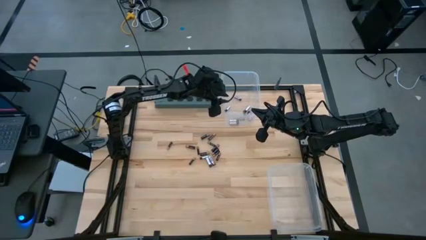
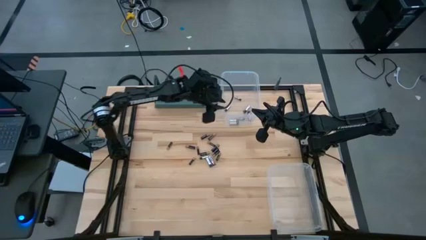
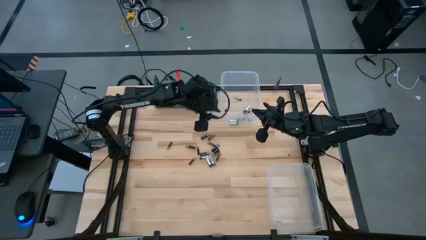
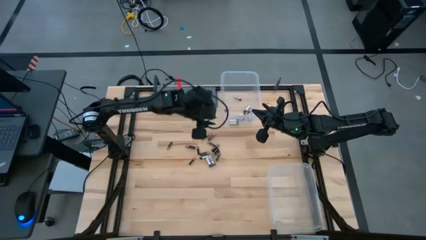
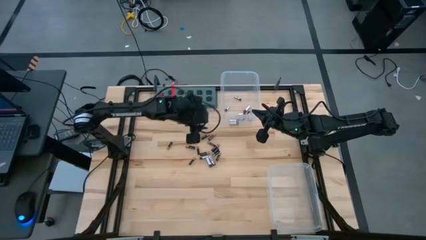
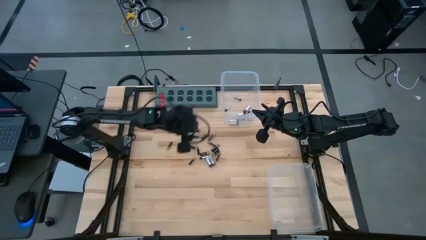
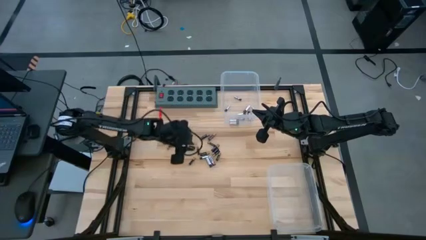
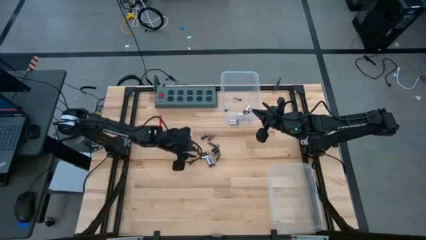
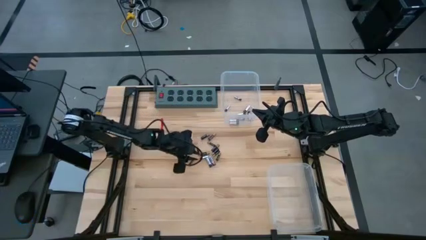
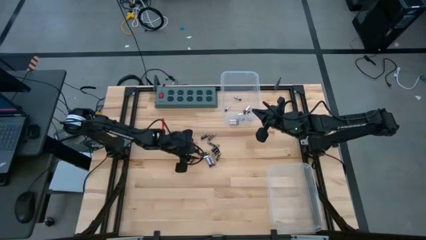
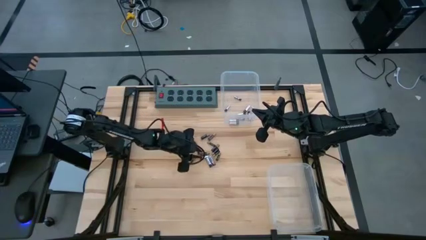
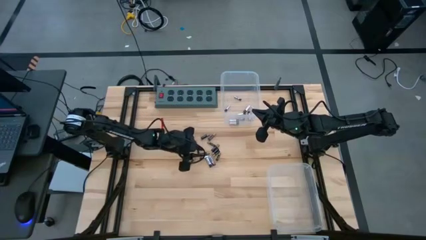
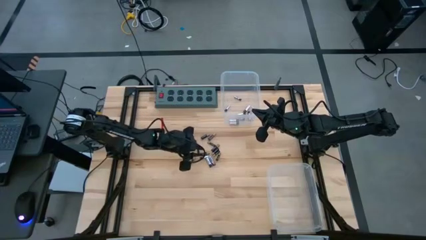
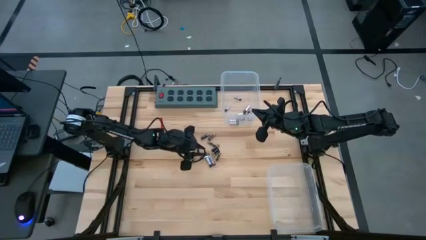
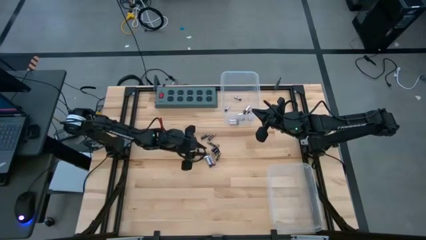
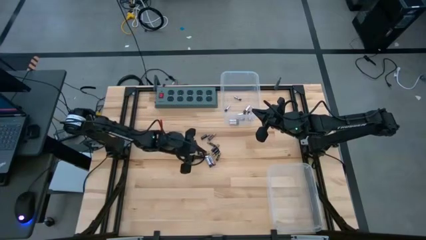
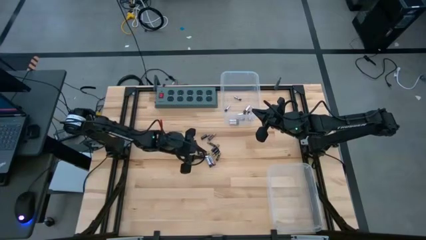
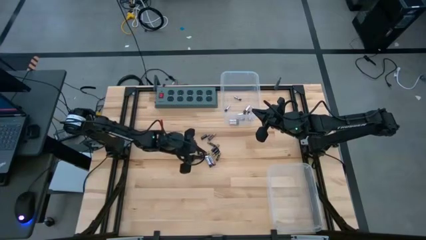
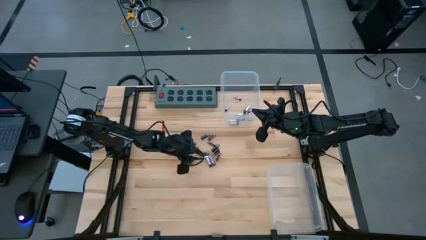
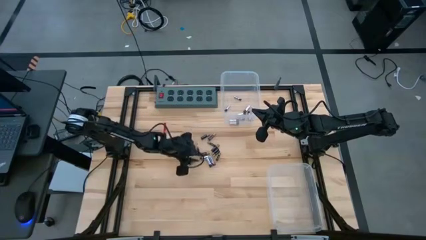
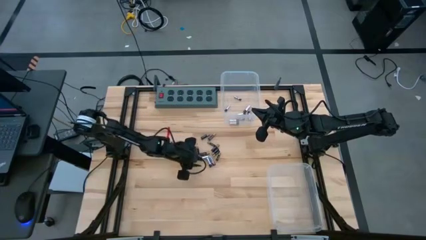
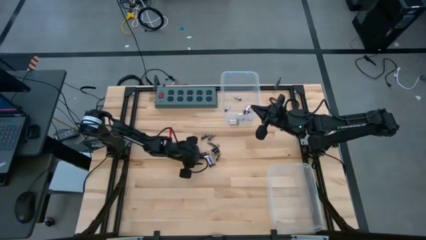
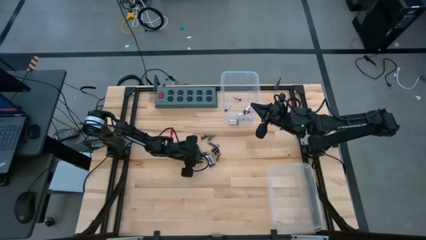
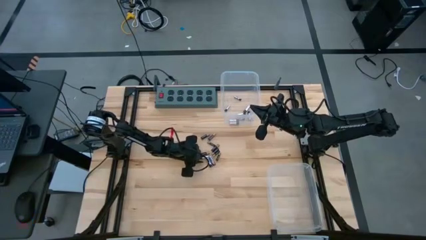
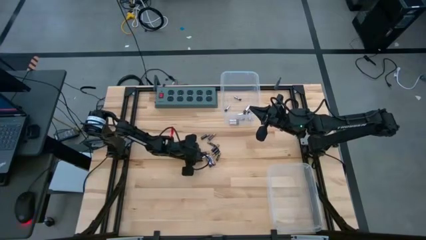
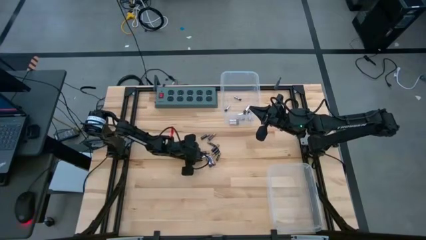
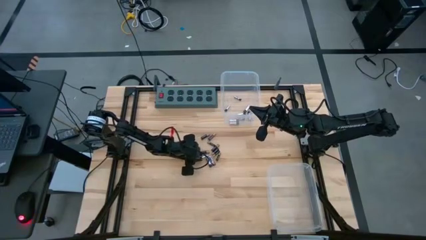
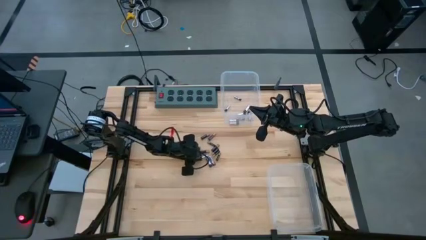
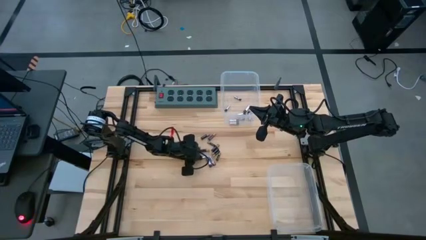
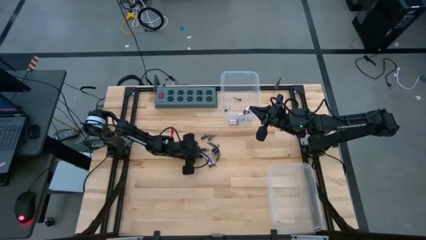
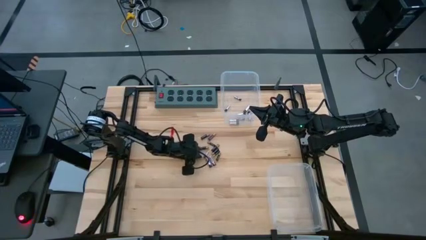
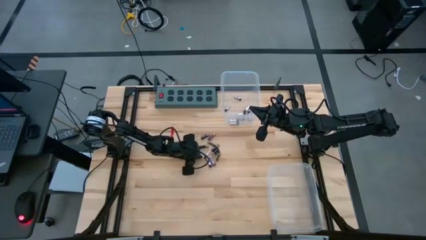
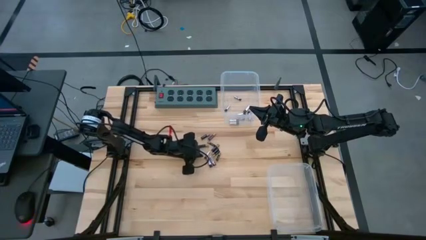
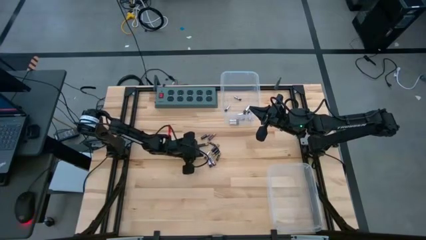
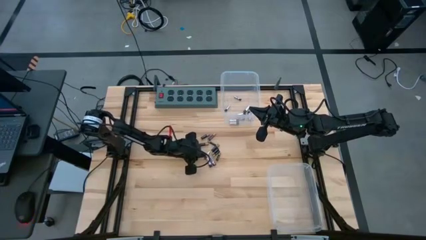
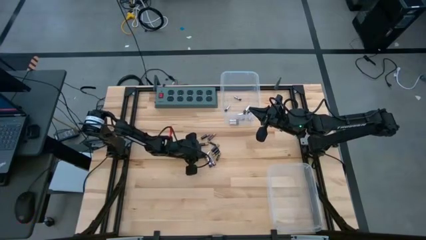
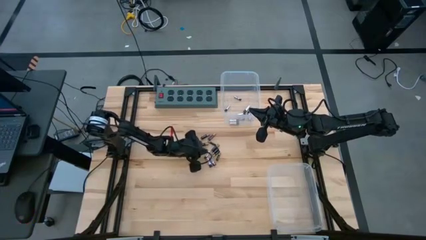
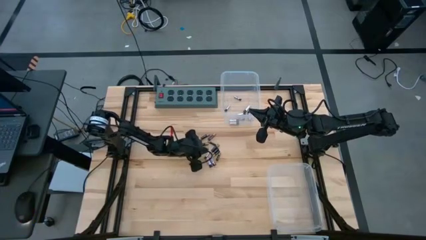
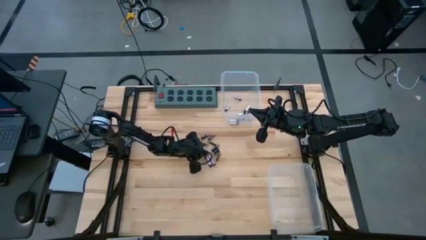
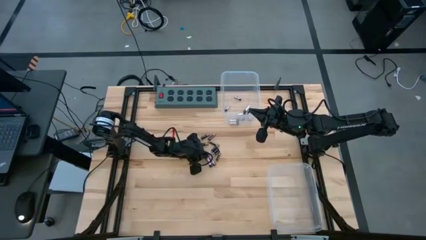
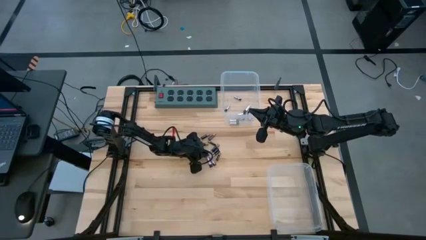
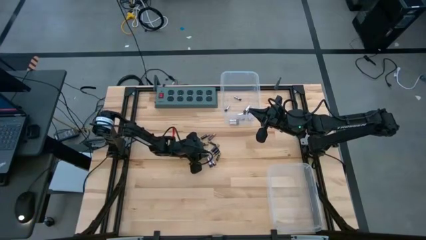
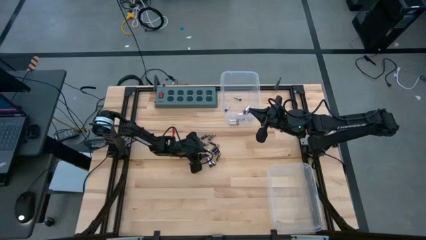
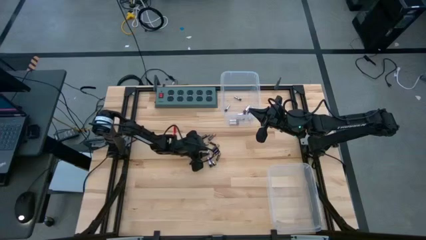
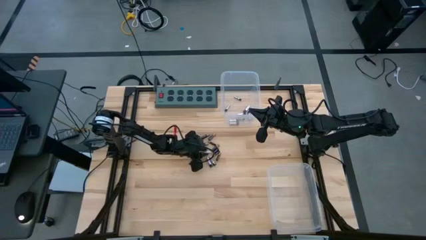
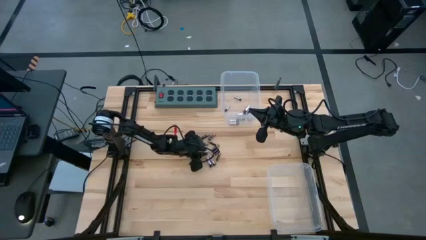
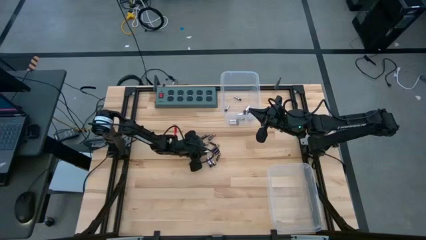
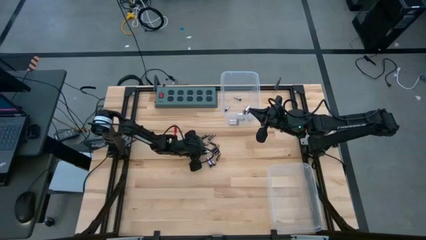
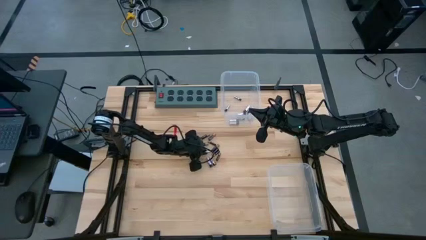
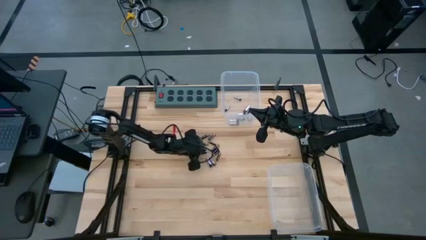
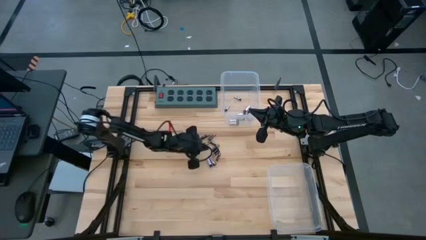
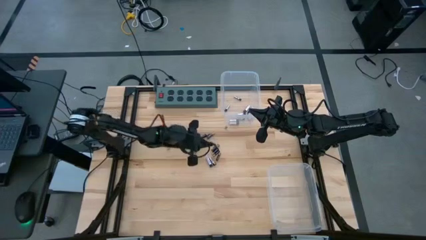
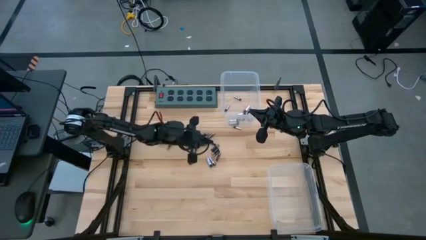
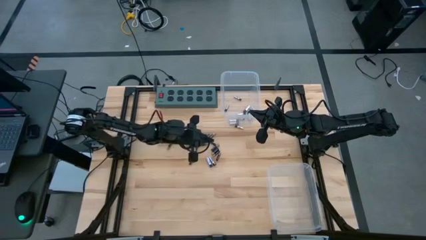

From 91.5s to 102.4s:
Task: Sort batteries
Put the silver battery into the top transparent bin

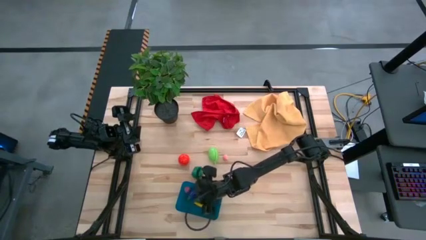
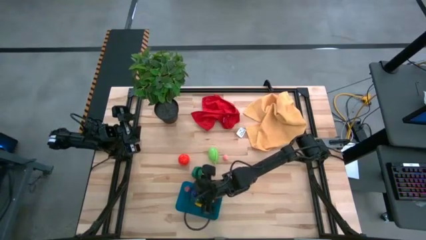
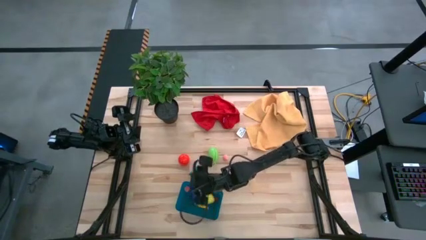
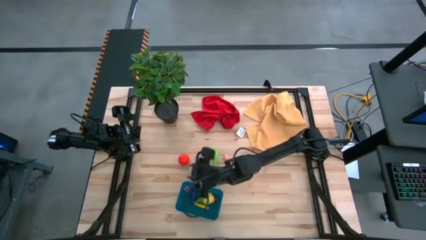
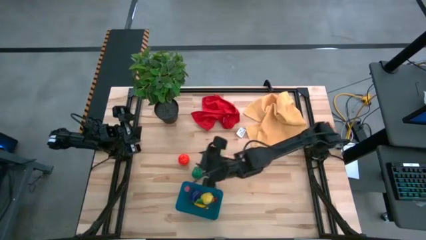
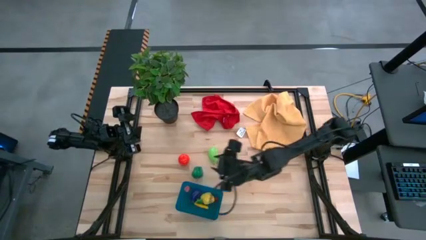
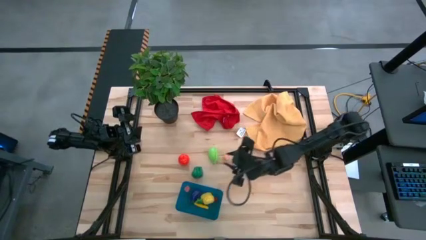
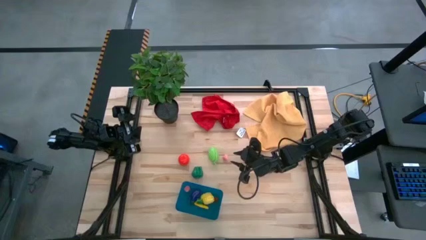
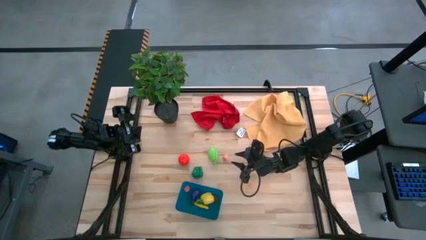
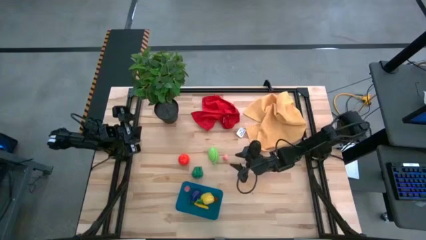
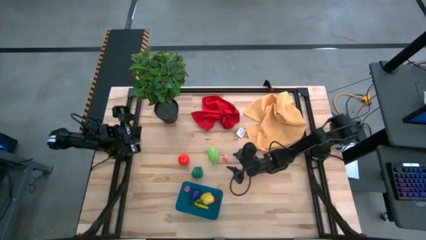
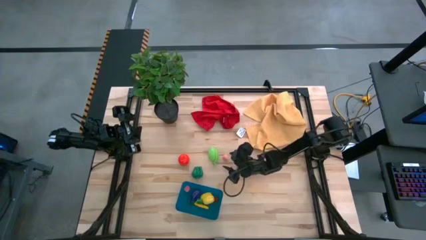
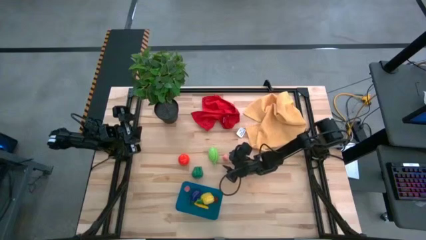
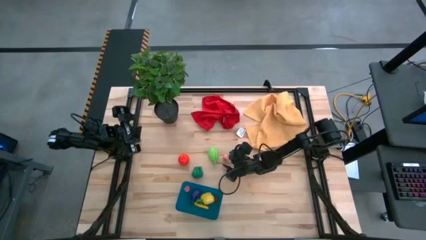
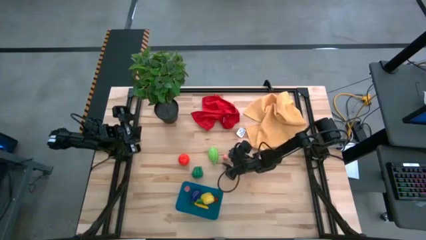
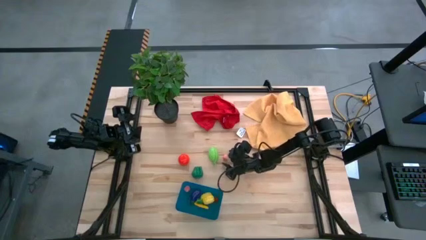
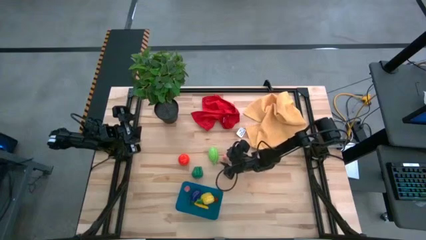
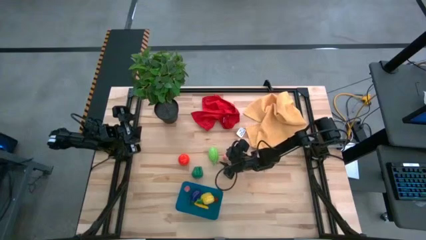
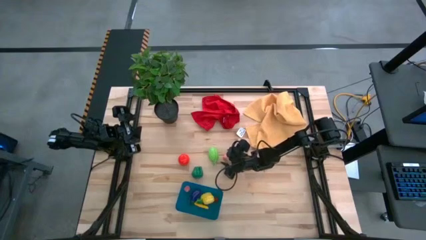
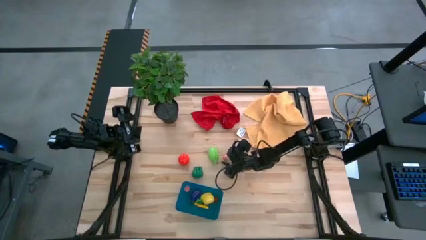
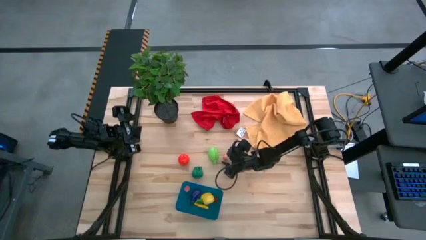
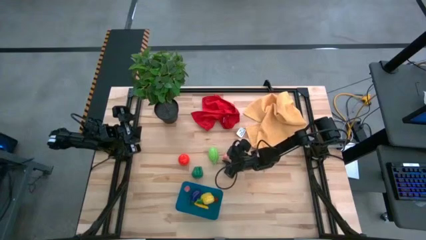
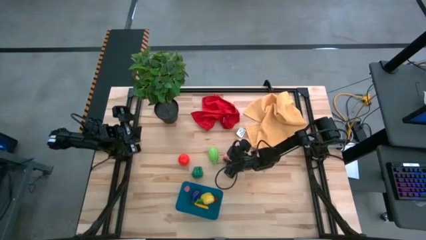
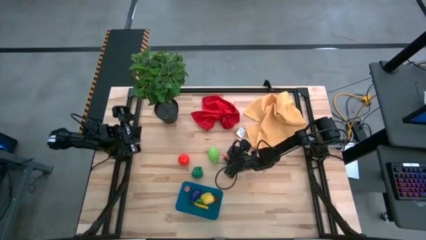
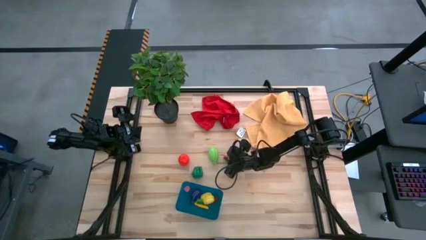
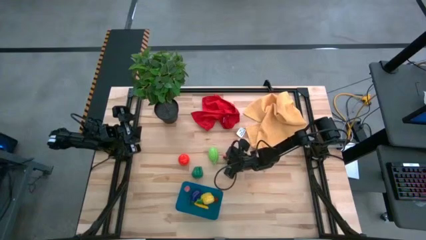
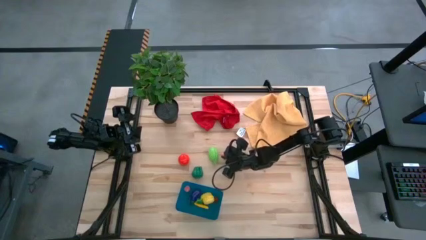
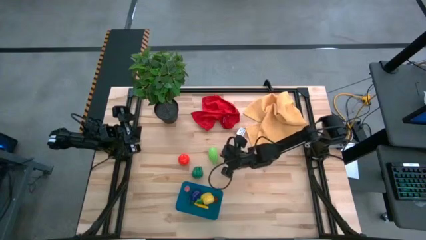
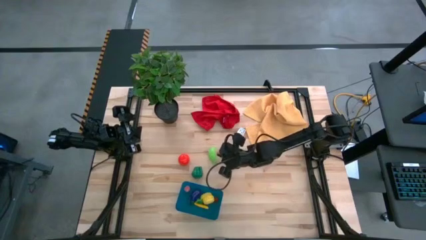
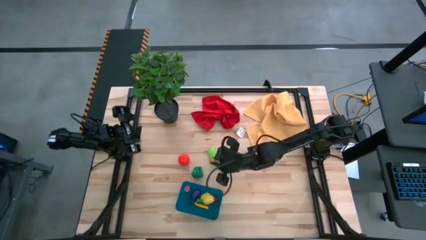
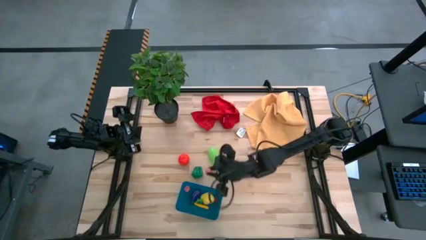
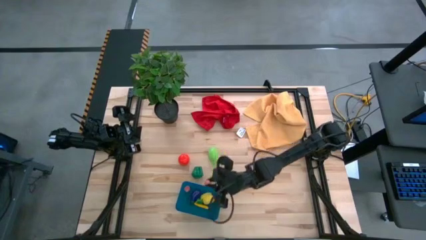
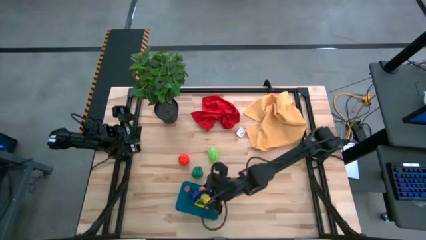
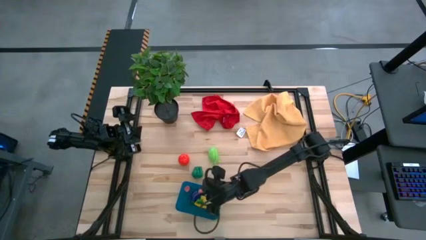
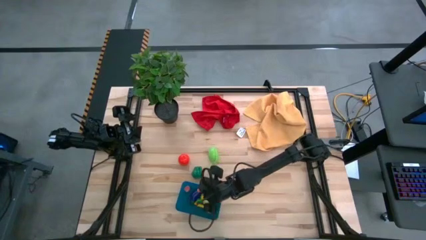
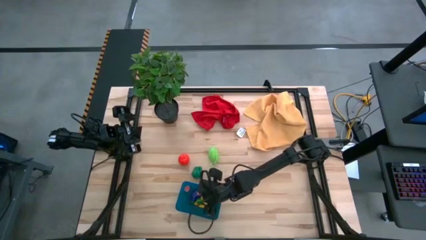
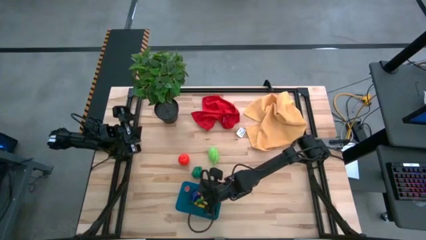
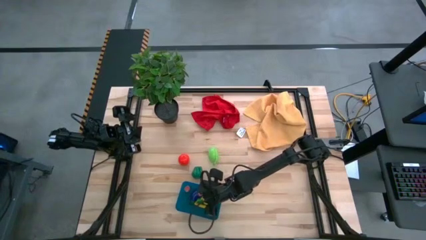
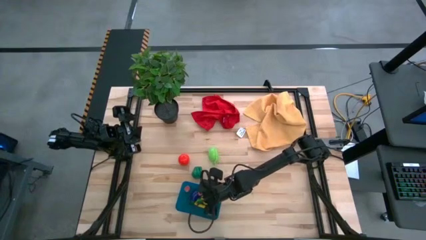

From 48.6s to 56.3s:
Task: Pick and placing Produce into tupperware
Put the peach into the blue basket
